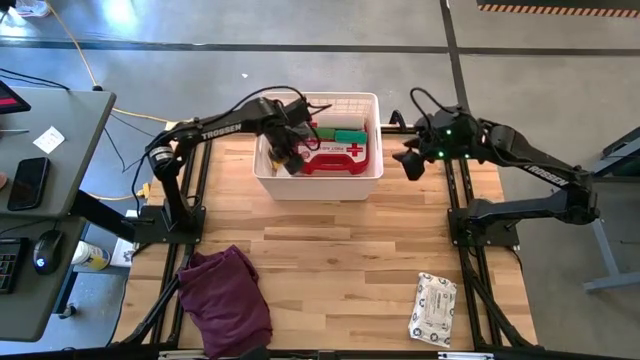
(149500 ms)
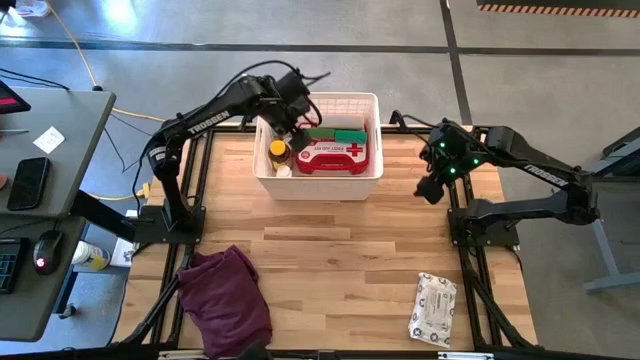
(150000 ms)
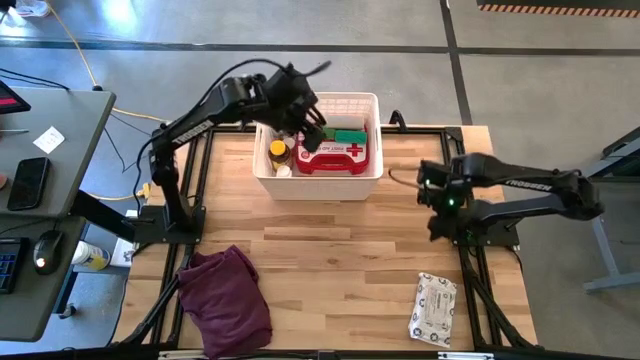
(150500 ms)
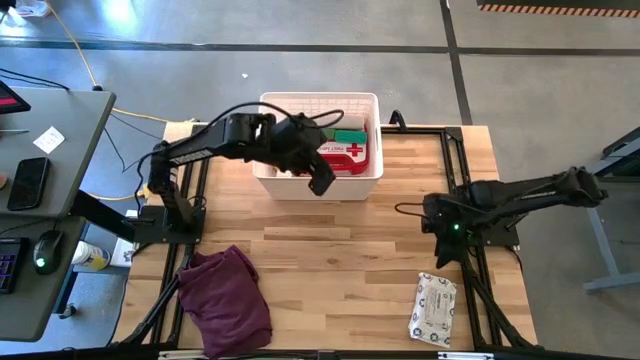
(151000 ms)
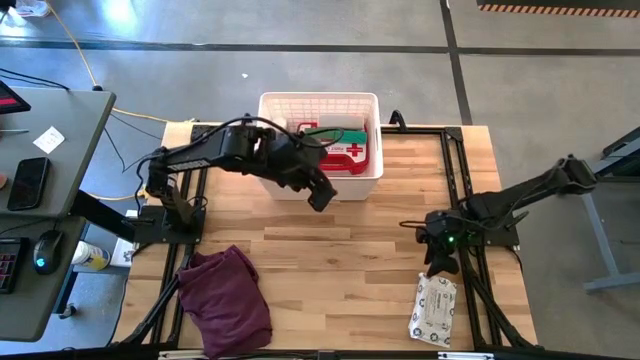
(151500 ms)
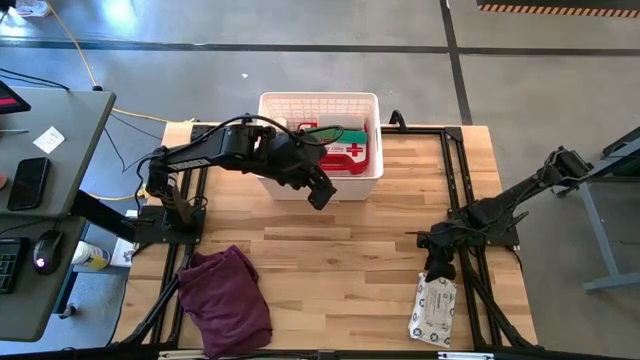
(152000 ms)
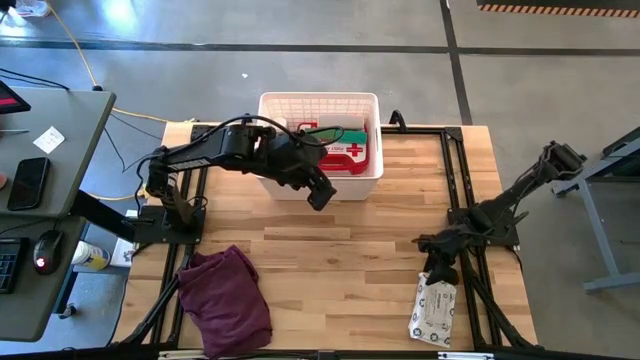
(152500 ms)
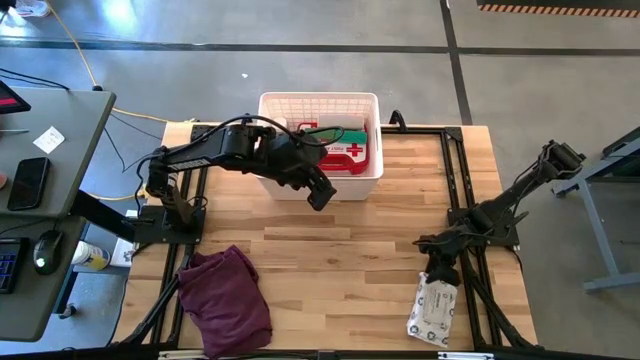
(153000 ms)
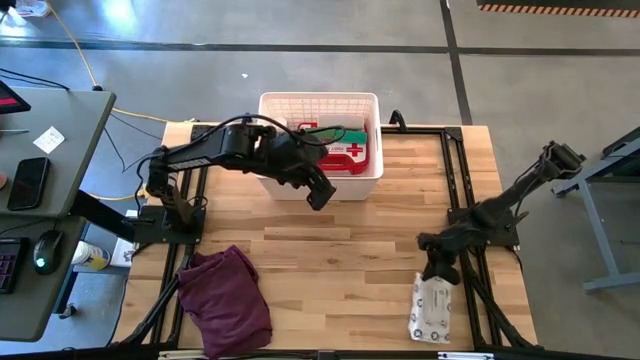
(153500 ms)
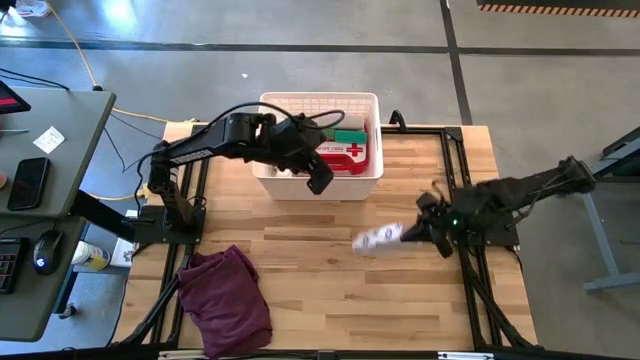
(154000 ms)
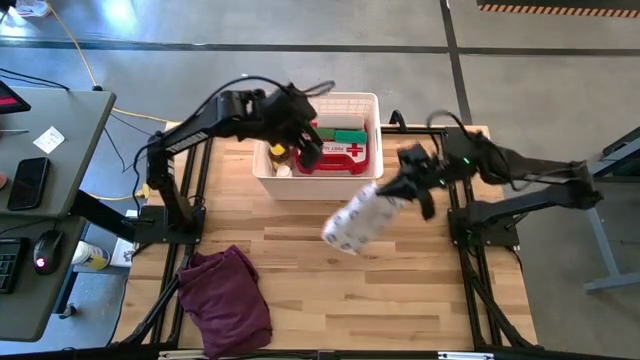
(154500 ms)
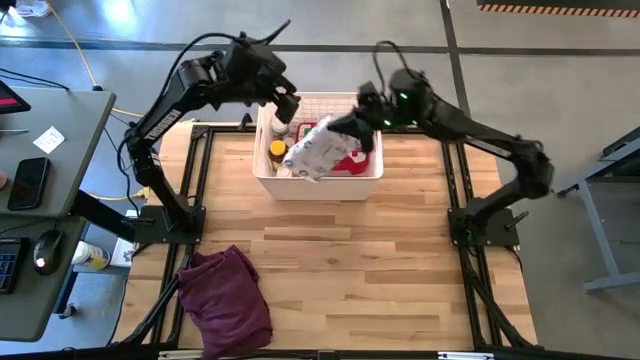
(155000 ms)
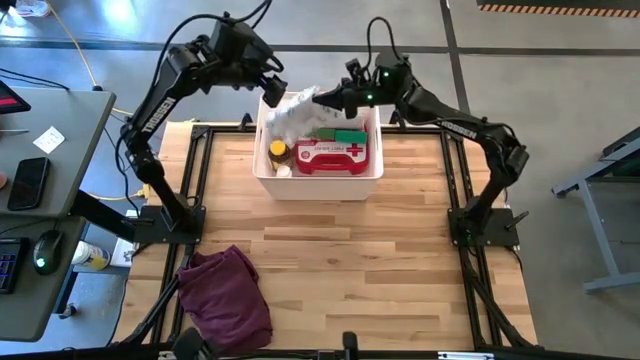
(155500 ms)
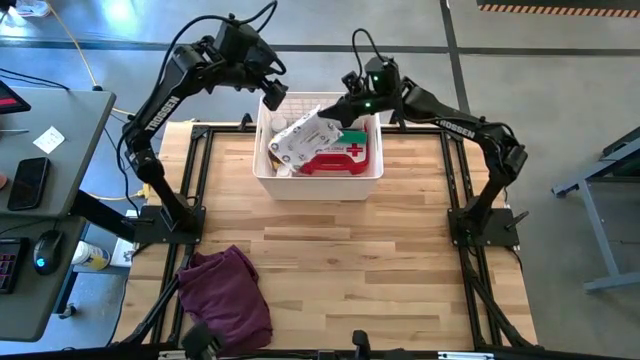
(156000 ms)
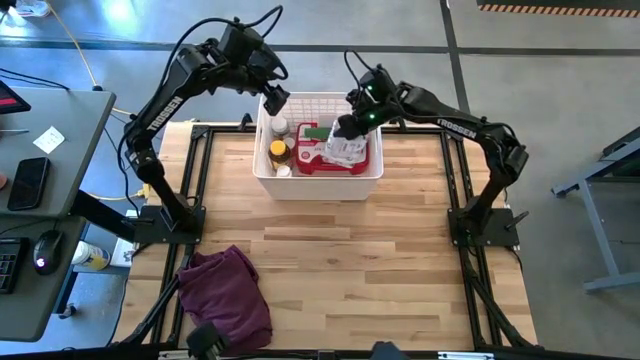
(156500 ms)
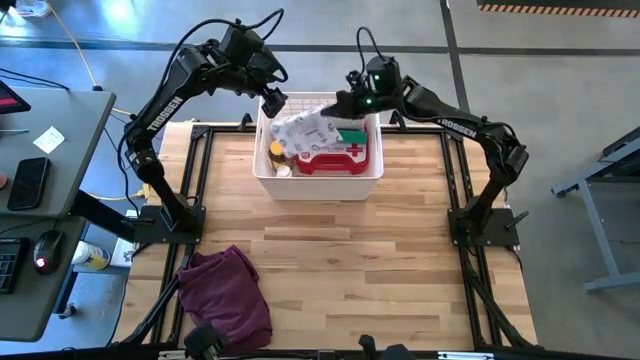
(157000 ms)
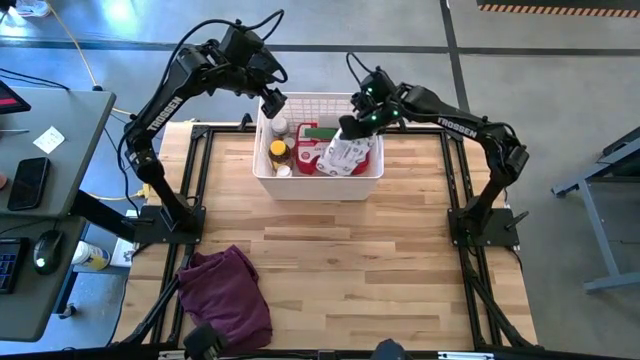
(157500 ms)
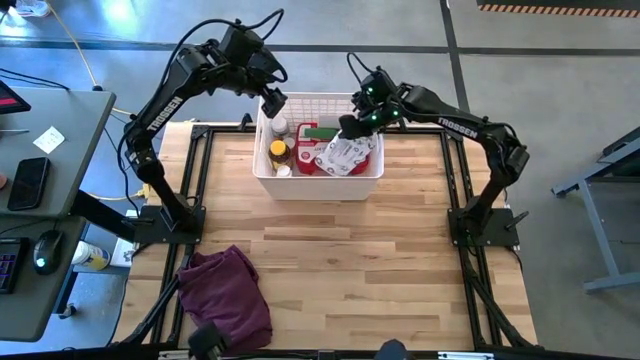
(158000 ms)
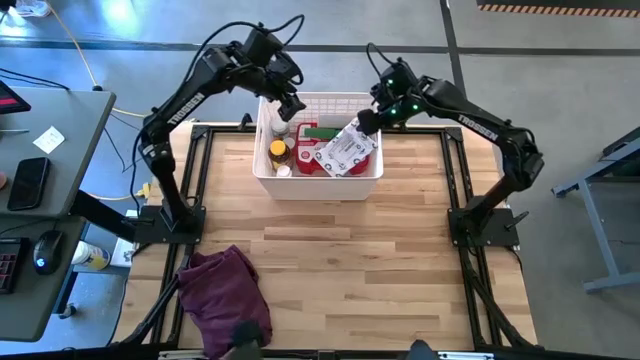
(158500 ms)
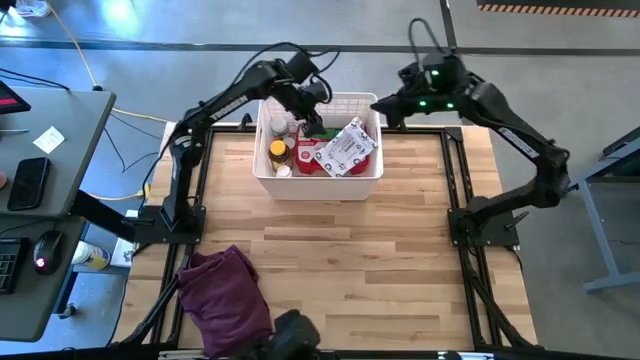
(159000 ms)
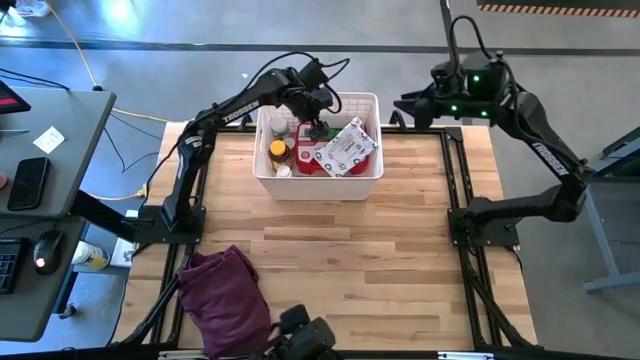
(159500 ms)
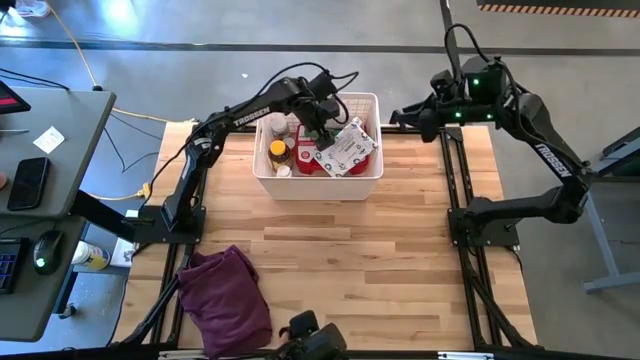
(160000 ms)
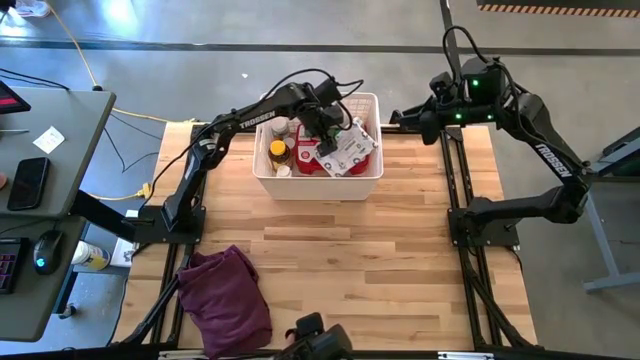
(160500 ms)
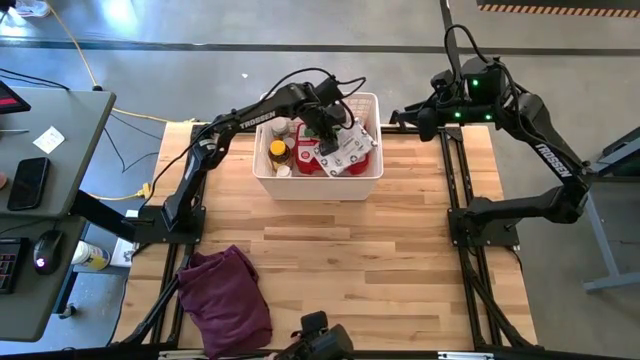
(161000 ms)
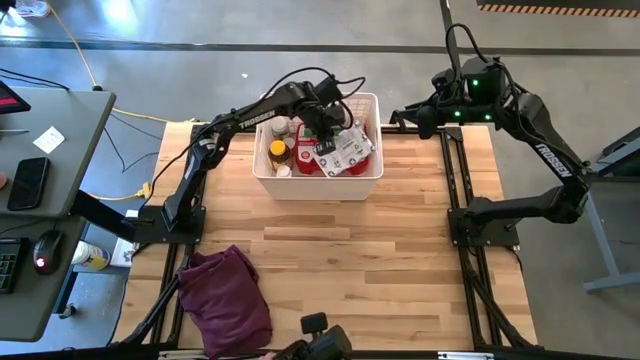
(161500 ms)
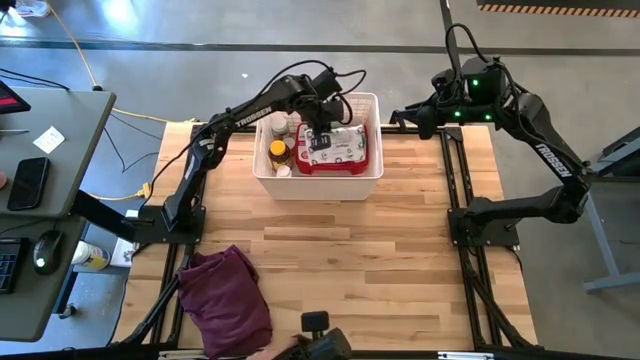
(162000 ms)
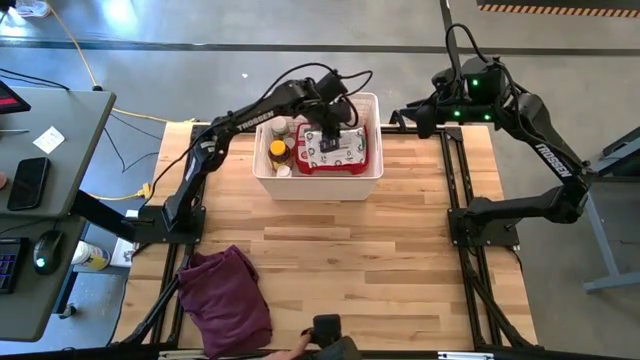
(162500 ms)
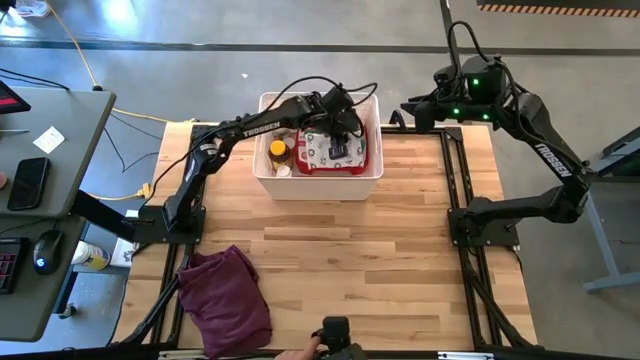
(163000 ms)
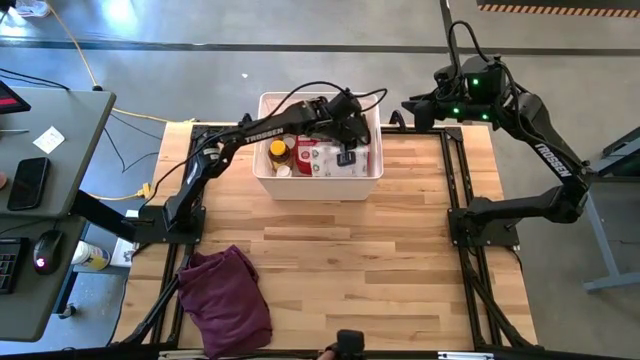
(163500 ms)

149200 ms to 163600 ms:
Task: Pick & place medical supplies in basket/bin
Put the mailer bag into the white bin

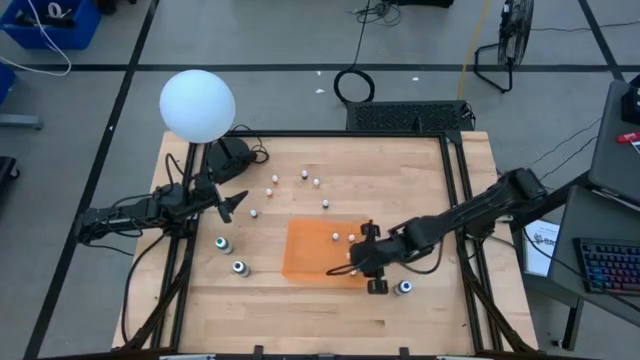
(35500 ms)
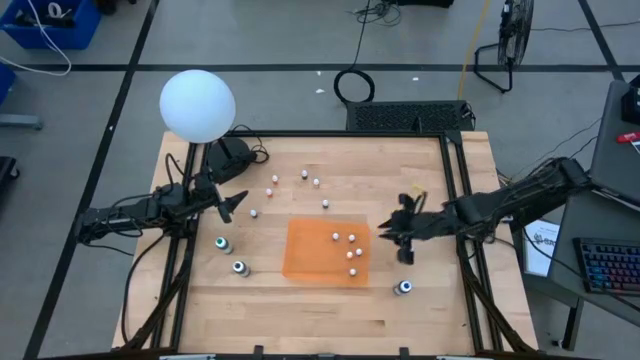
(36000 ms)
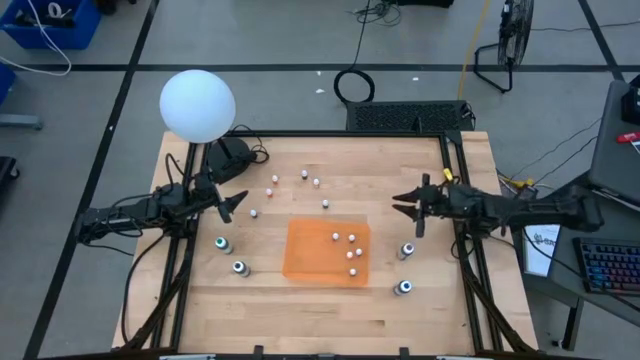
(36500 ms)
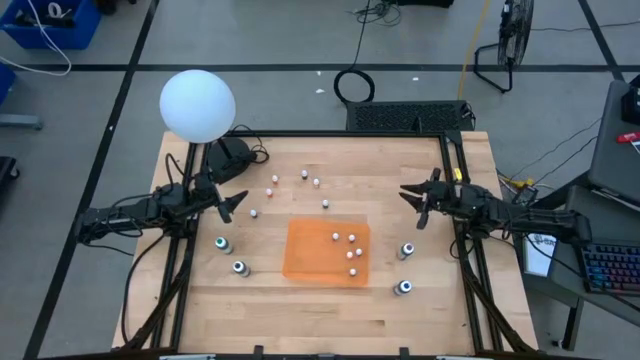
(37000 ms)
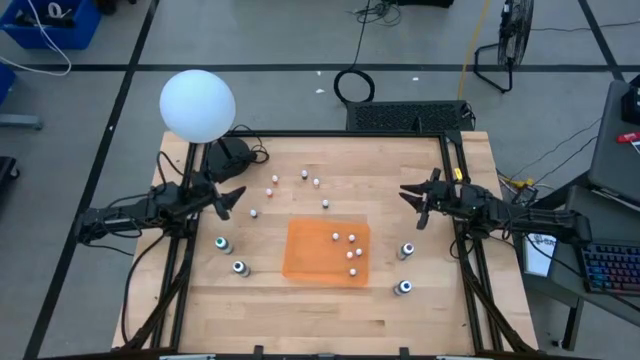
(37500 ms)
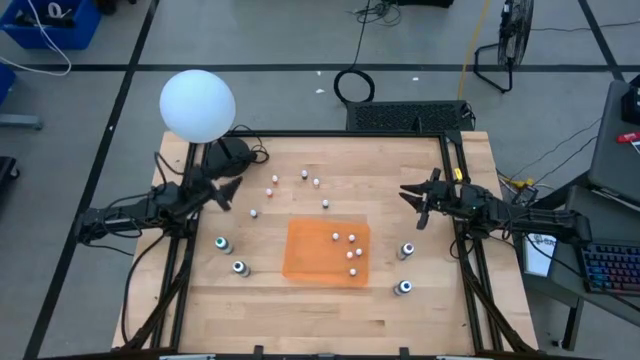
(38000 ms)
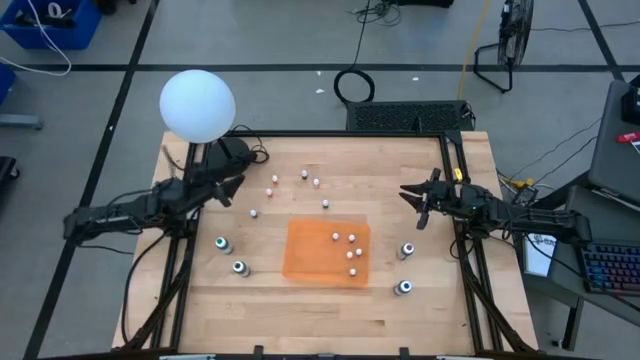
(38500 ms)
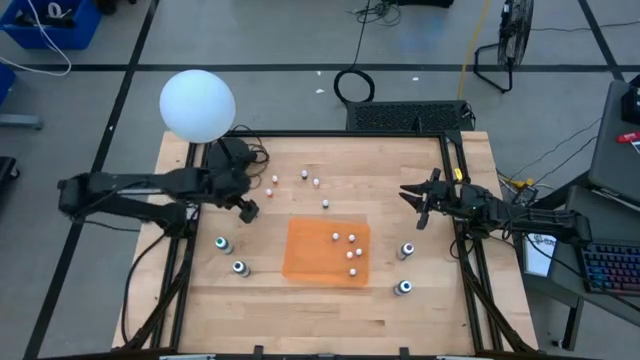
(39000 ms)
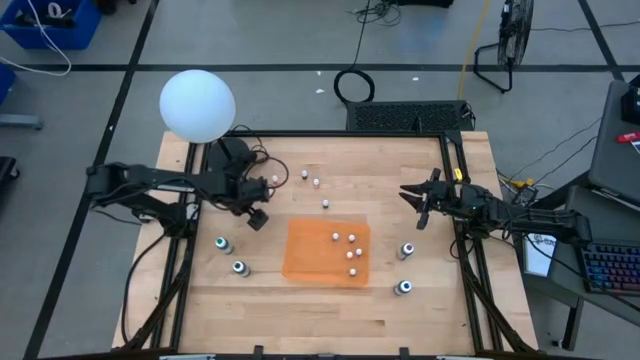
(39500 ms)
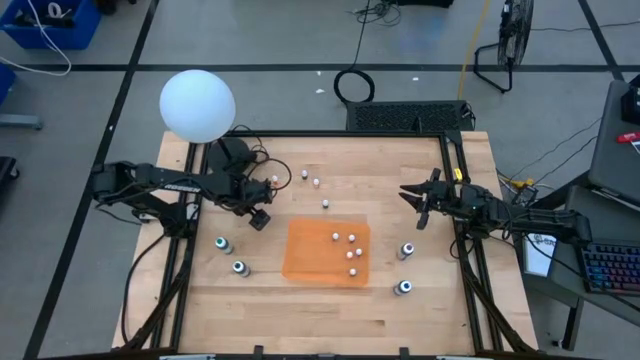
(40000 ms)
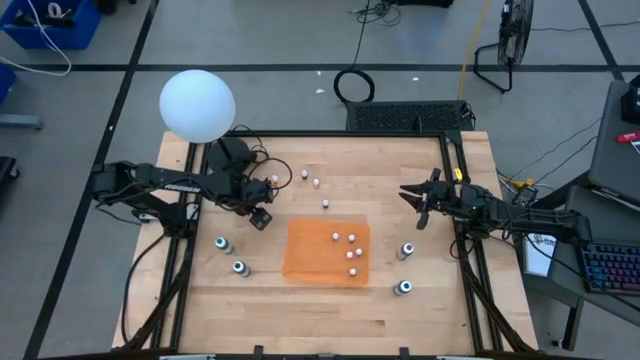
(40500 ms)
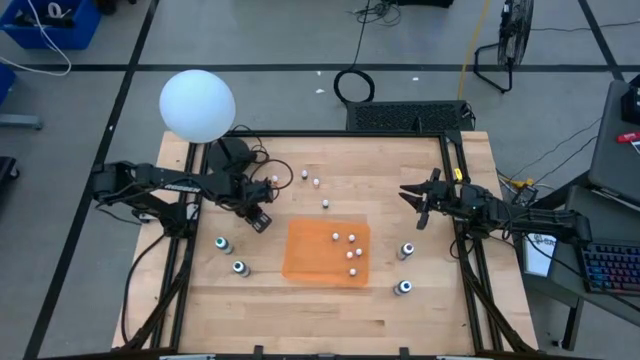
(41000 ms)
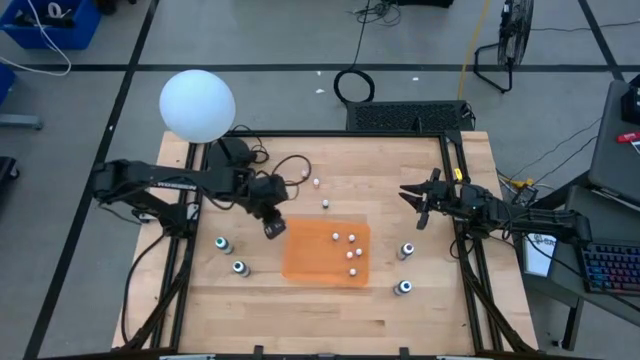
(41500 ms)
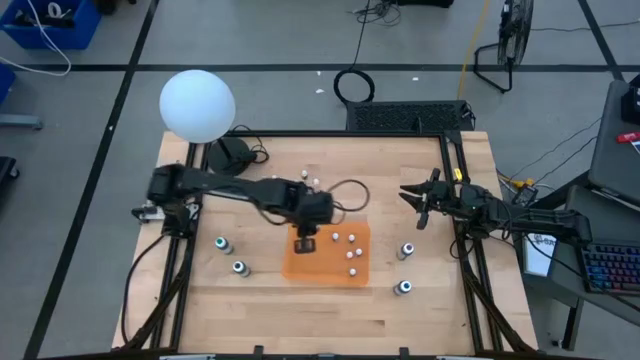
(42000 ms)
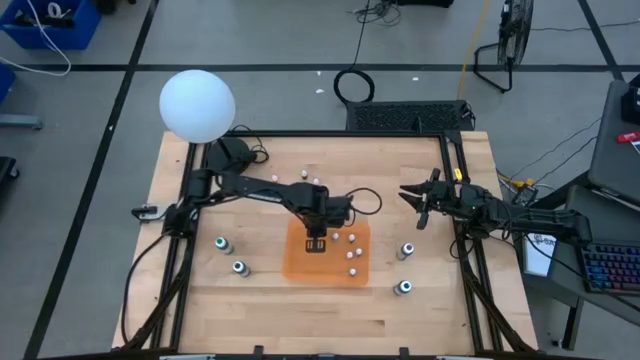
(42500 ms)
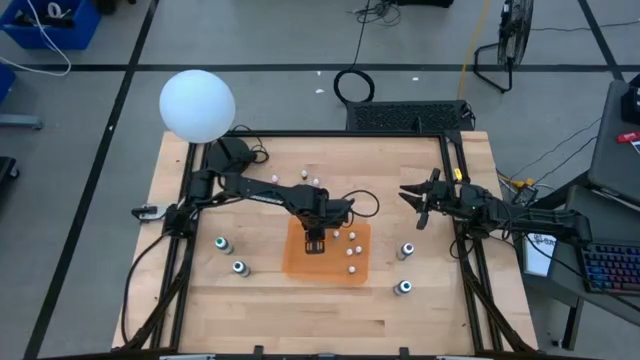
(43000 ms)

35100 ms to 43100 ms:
Task: Pick & Place food coloring
Put the blue food coloring bottle into the orange bin
